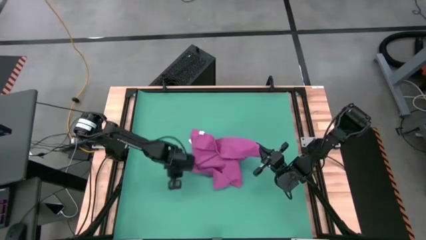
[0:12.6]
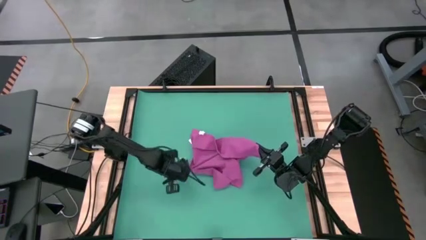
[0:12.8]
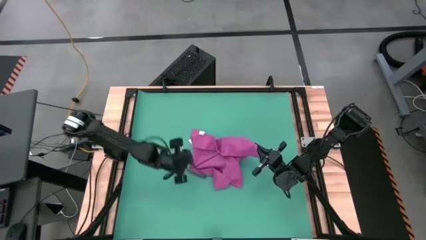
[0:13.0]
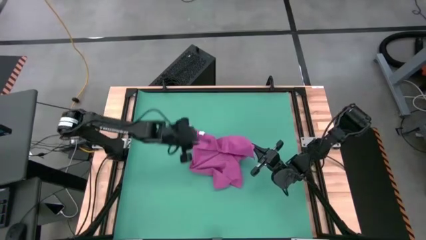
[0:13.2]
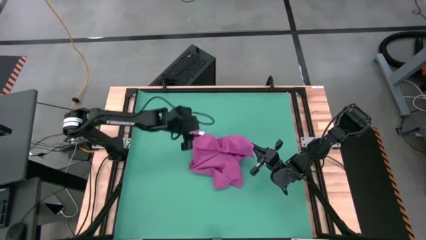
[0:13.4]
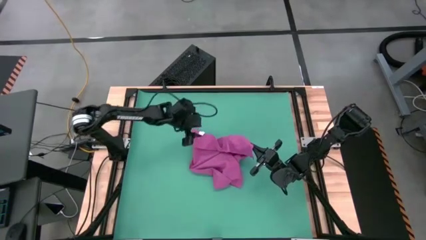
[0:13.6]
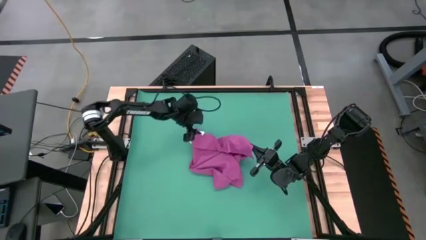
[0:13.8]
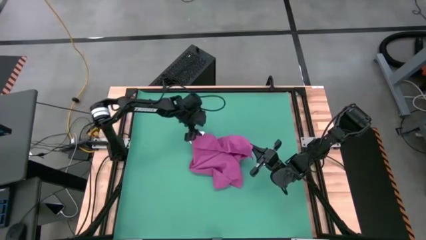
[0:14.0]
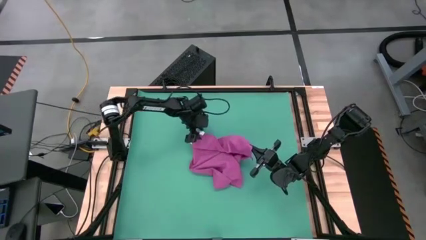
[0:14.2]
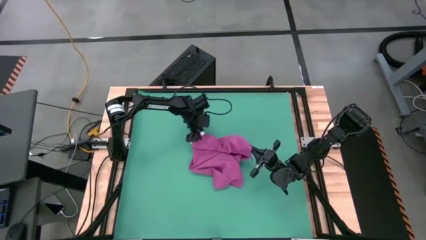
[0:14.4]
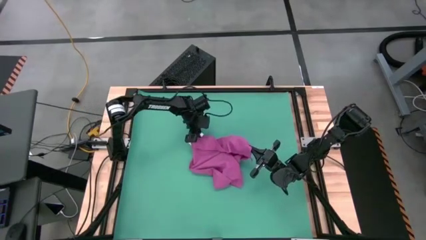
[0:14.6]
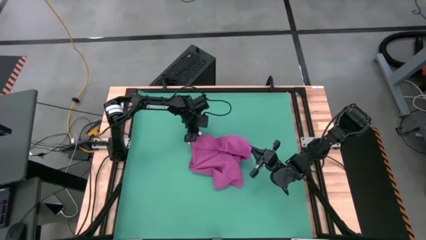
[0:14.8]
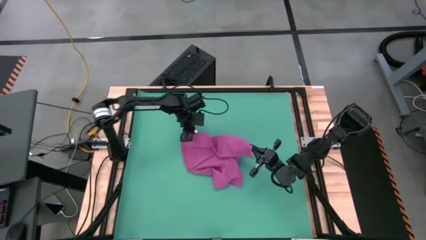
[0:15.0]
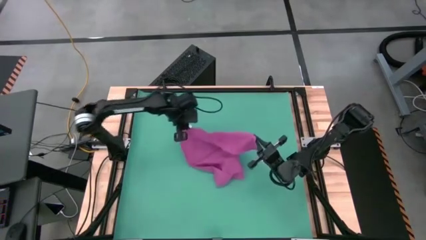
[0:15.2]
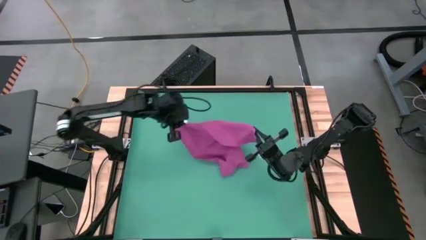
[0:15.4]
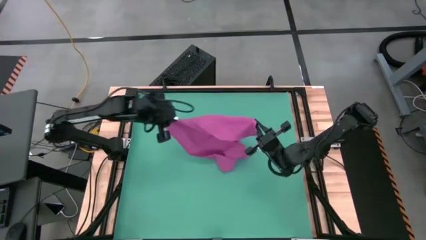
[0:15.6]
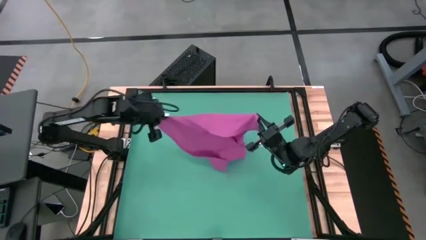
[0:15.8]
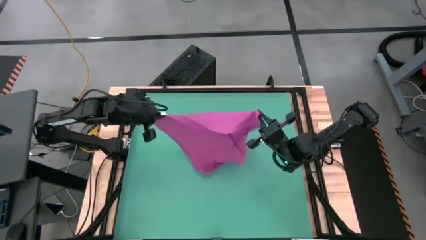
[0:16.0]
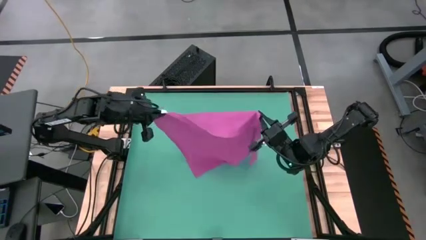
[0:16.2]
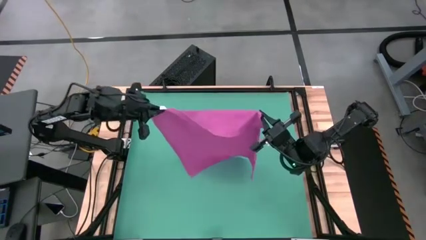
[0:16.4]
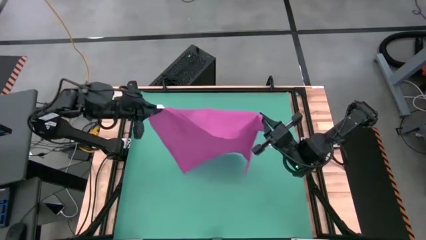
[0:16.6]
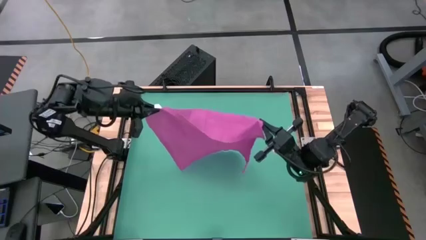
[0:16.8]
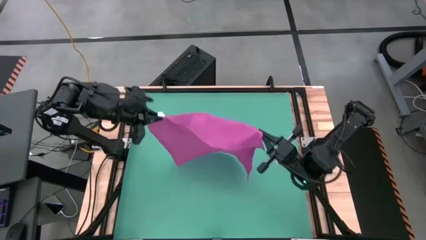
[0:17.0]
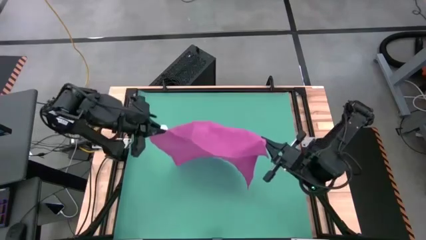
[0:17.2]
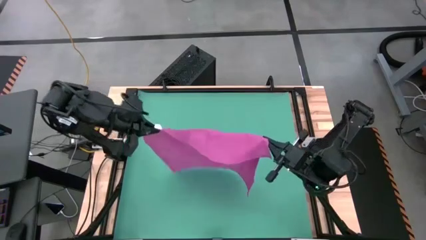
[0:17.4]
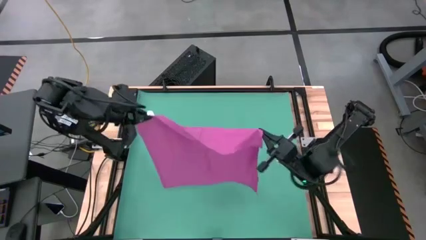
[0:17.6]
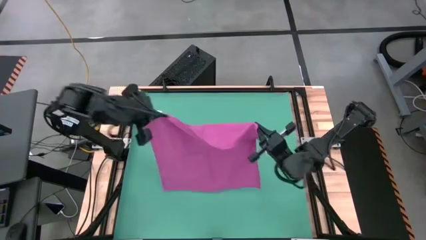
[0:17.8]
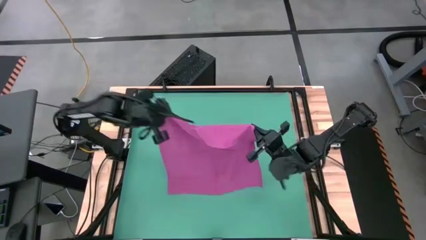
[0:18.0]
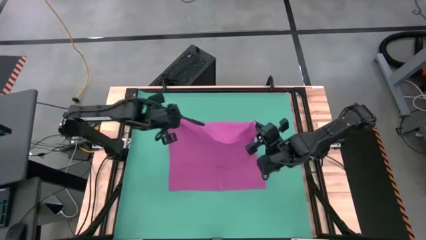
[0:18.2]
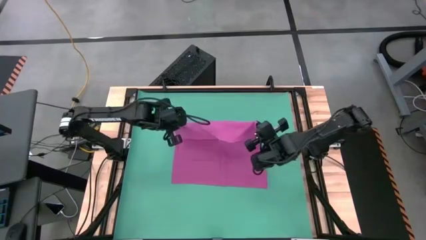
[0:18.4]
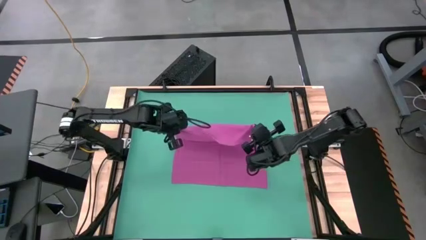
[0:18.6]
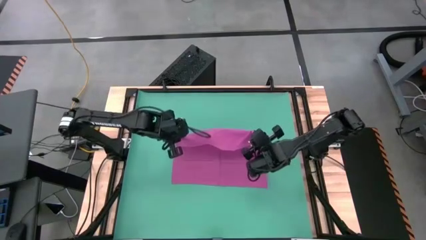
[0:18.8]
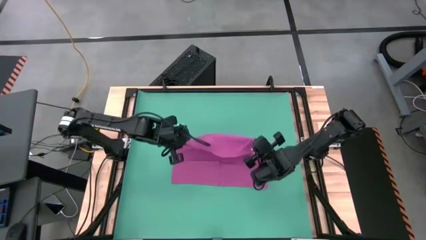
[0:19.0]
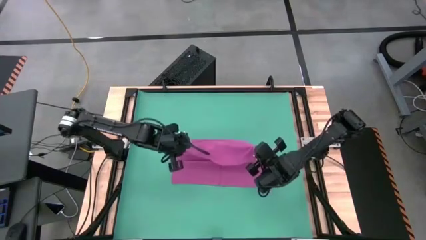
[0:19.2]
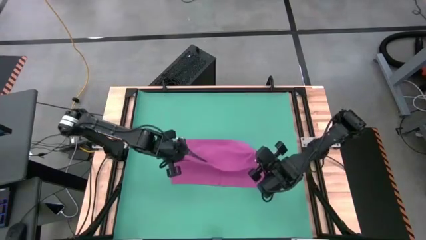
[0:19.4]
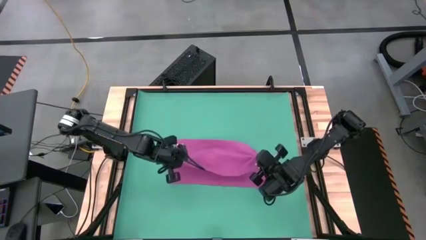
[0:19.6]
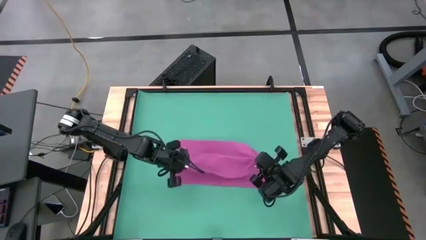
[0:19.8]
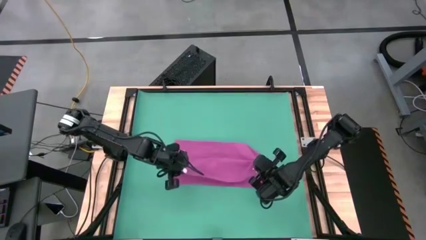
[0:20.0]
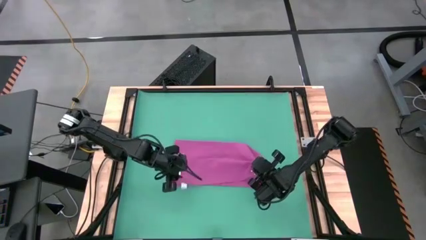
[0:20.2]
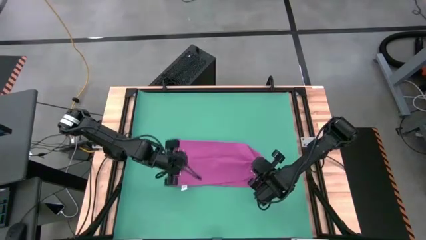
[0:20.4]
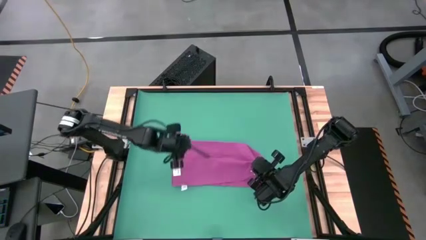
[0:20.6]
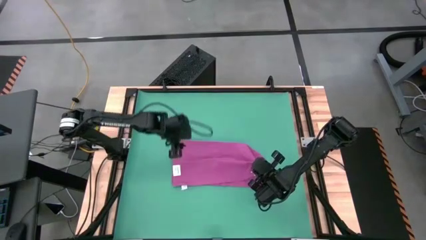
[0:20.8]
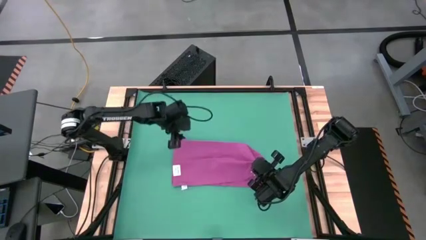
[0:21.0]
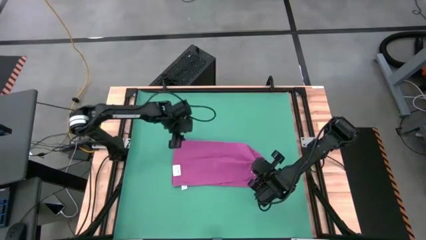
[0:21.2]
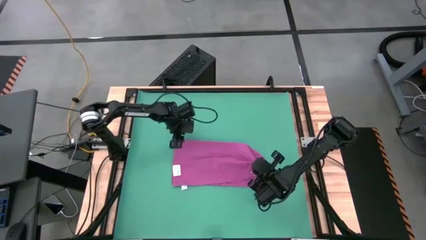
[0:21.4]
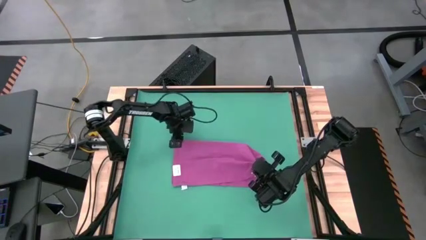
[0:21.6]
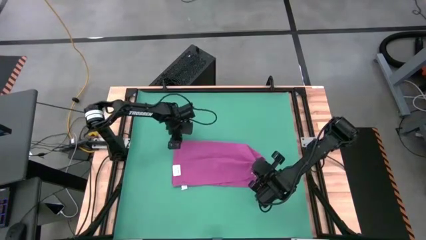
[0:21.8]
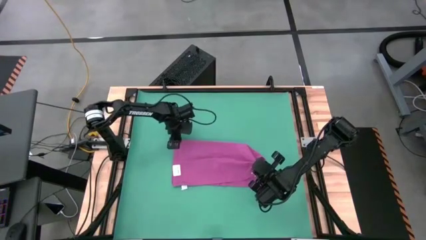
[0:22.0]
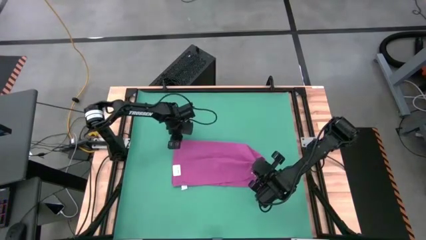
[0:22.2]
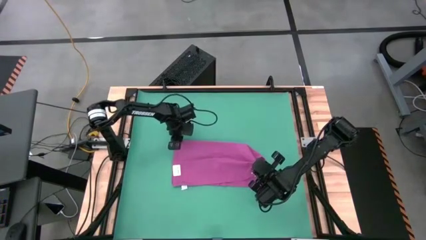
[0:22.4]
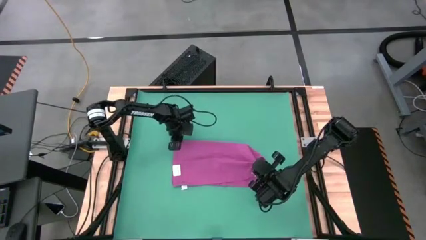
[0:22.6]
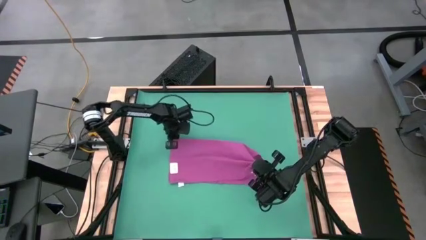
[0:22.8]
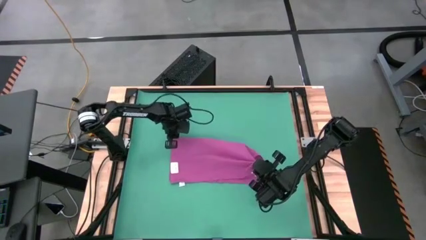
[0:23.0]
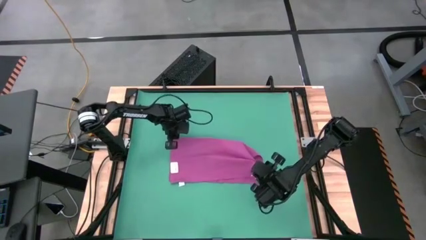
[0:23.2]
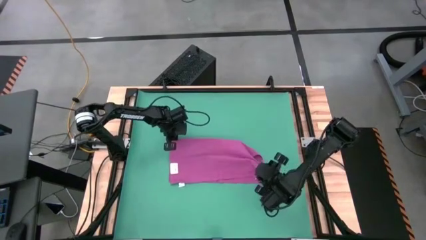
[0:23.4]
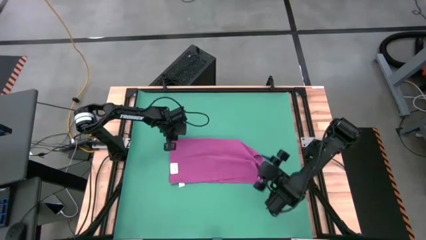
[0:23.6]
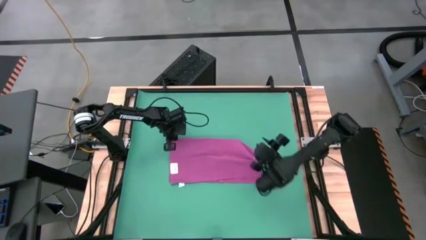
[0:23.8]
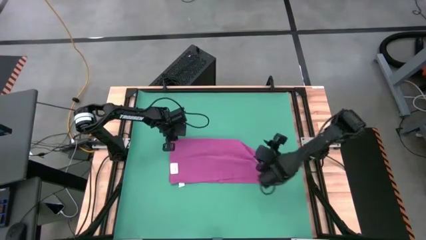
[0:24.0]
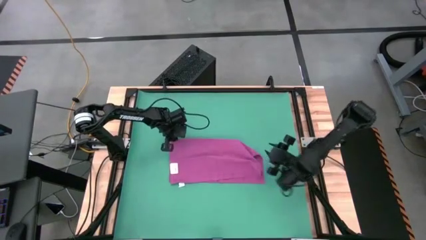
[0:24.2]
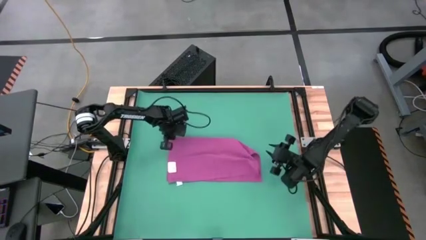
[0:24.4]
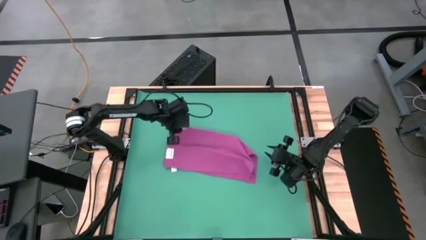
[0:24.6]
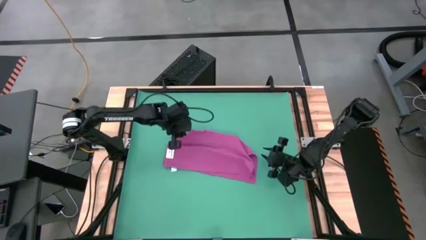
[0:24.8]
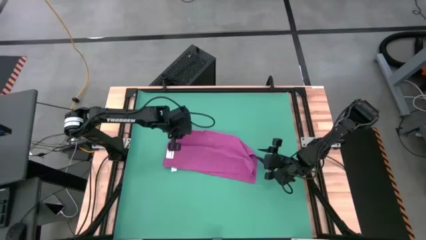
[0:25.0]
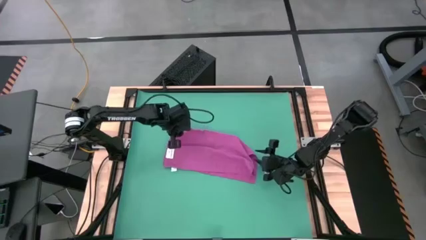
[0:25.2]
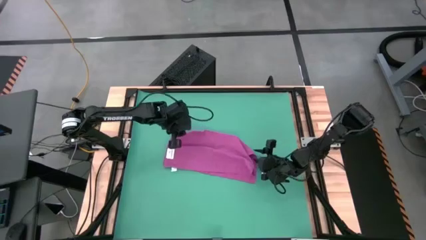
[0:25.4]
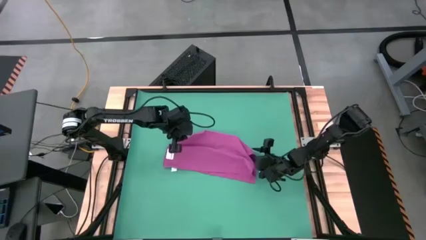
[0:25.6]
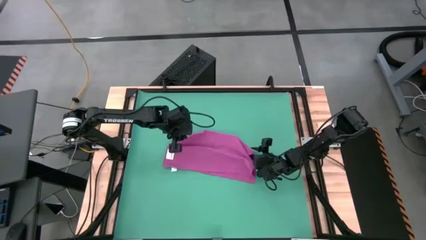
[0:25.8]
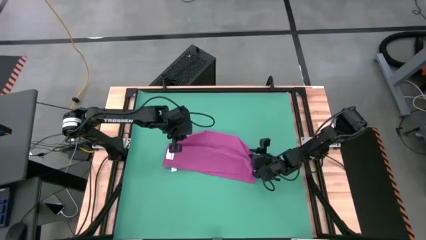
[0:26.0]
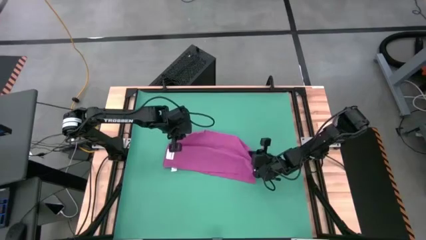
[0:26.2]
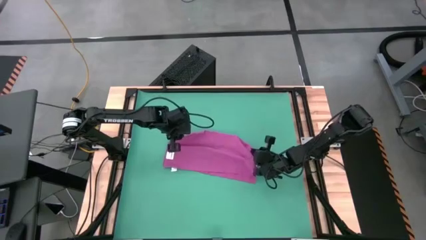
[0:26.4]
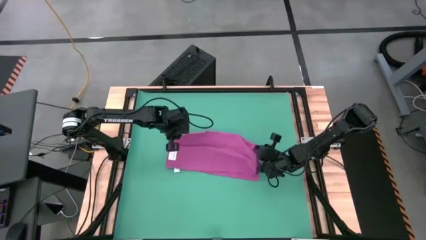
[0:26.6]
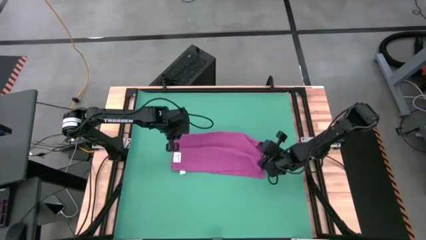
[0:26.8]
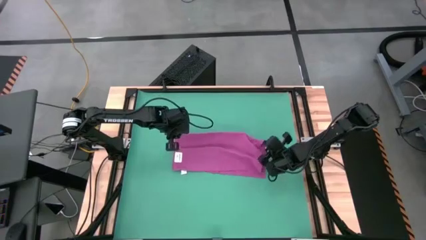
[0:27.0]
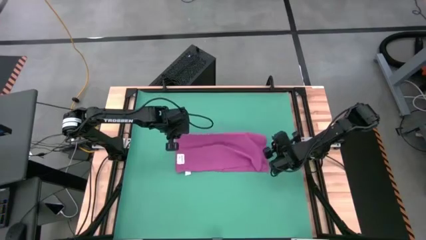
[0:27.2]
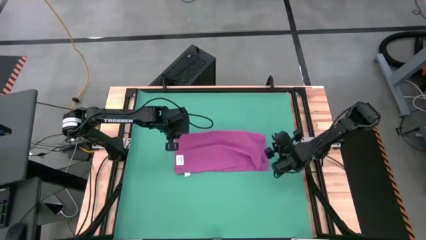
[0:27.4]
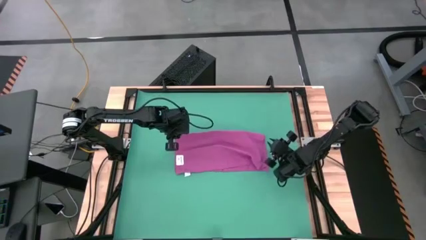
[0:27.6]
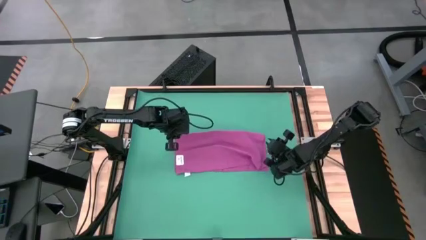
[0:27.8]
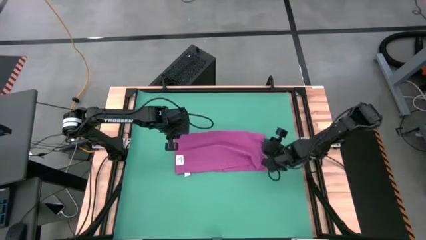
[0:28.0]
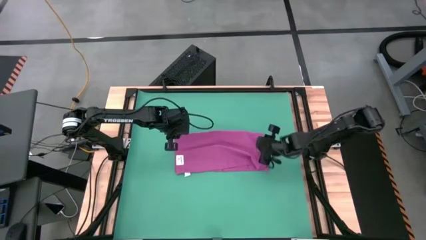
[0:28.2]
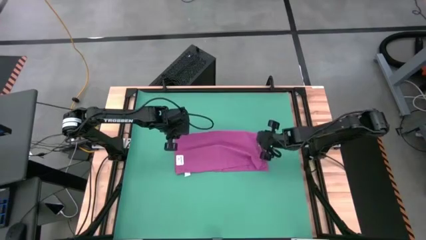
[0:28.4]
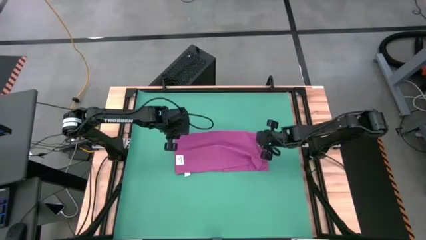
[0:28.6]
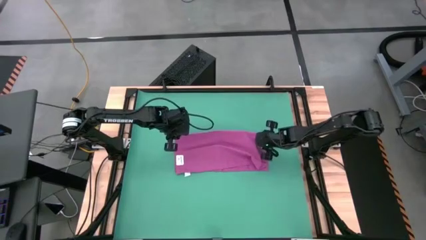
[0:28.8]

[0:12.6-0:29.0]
Task: Roll towel
Fold the violet towel
